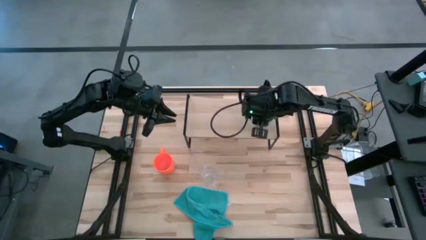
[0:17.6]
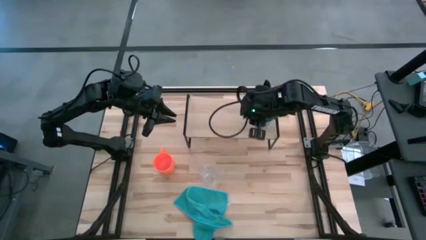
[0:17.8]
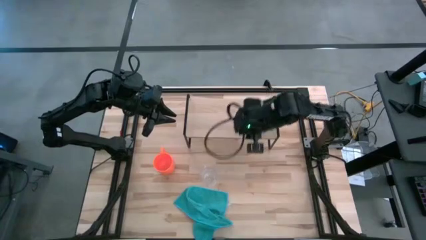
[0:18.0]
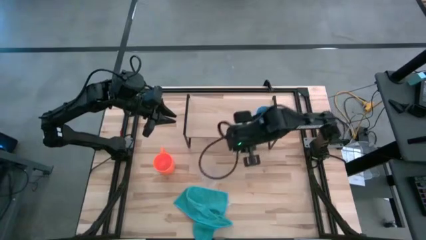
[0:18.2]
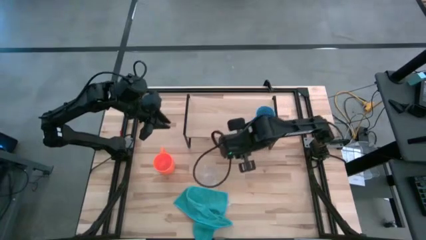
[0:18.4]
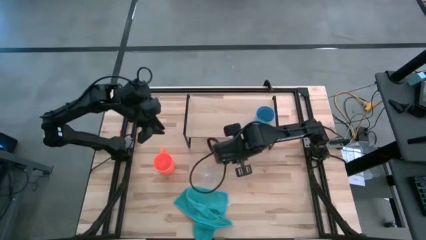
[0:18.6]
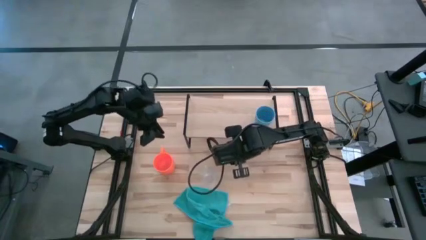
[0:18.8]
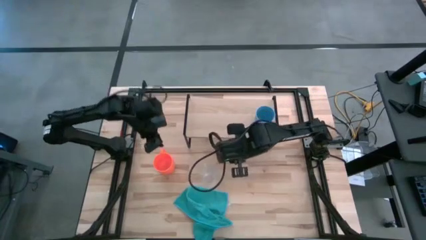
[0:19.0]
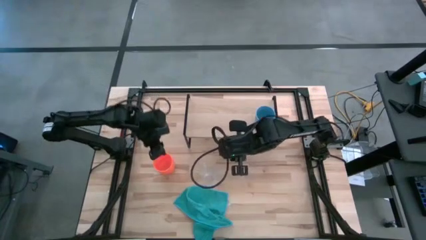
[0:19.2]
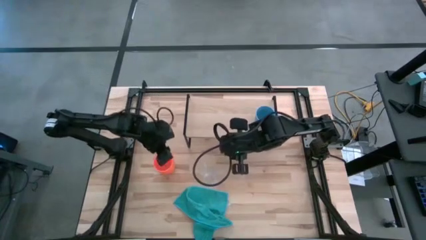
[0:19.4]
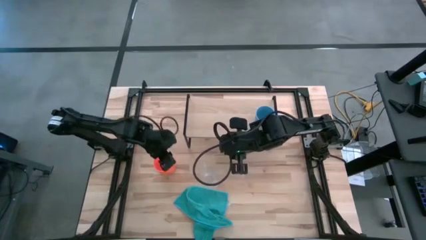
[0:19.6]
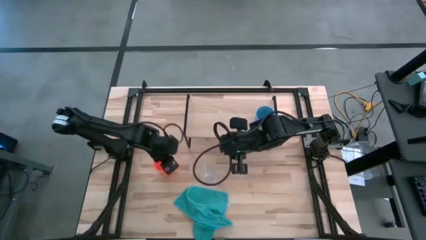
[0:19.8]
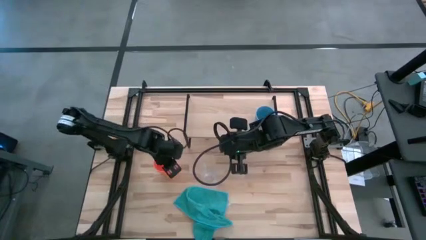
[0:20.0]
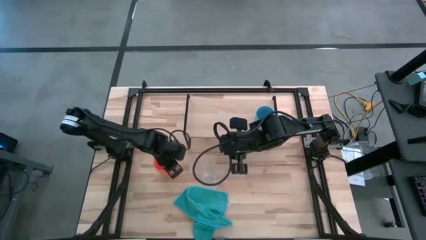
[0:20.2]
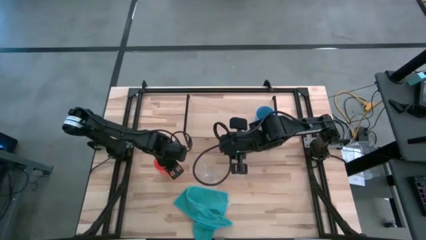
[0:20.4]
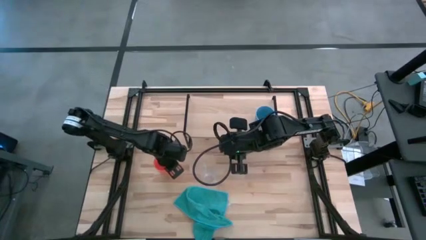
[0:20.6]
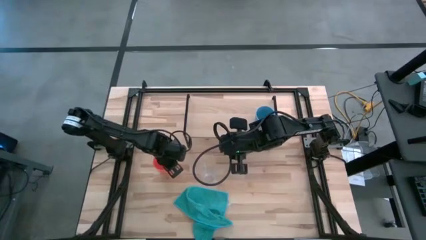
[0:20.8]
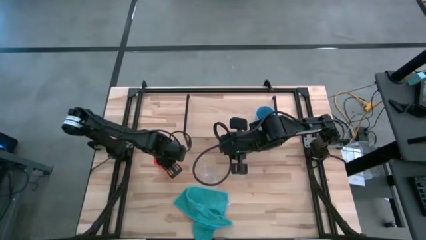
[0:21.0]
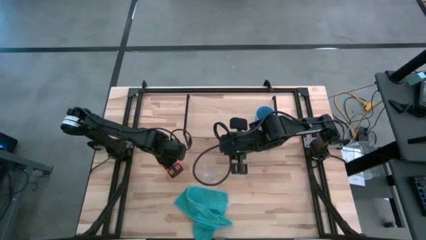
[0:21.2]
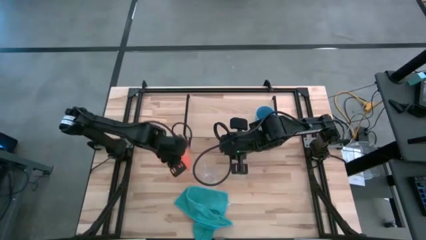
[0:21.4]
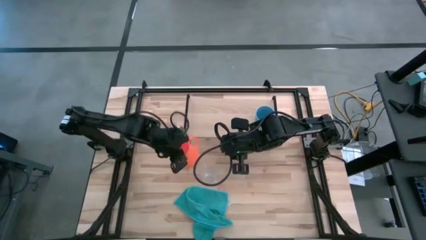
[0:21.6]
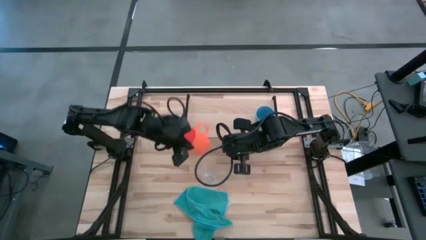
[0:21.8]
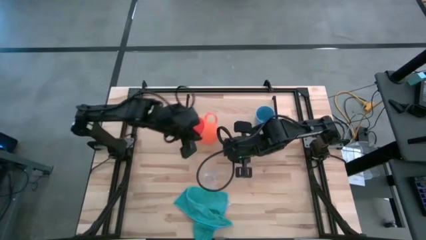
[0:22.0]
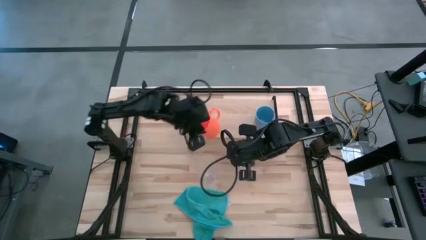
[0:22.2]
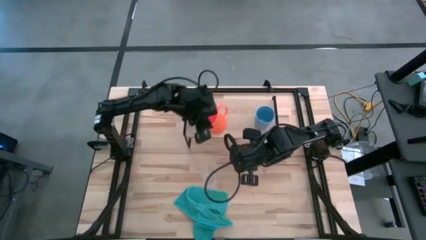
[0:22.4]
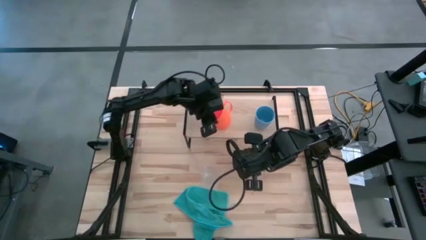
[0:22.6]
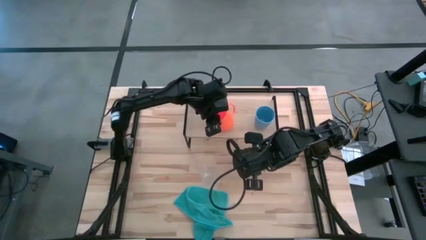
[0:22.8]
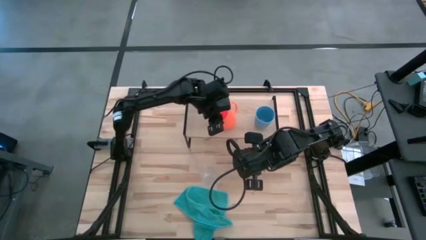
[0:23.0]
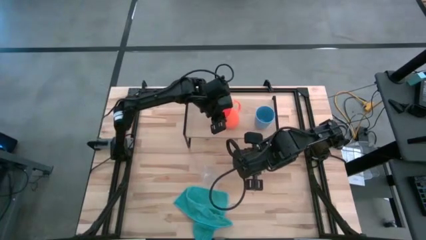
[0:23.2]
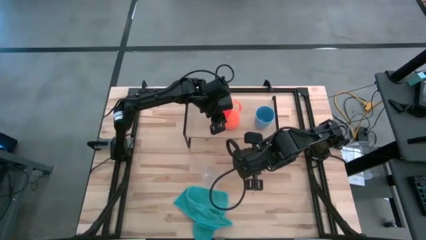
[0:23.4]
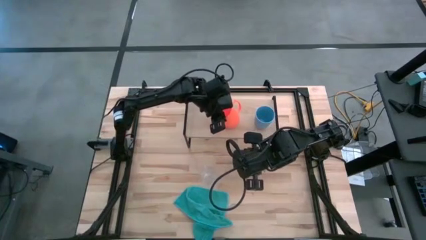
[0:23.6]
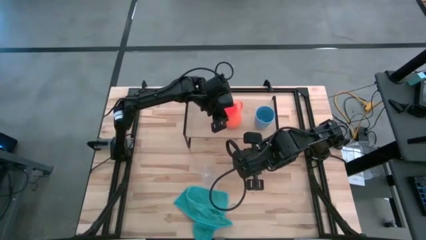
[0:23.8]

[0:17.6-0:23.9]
Task: Stack small to large cups/mugs on shelf
Put the orange mug on the shelf

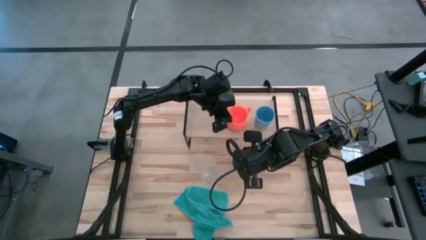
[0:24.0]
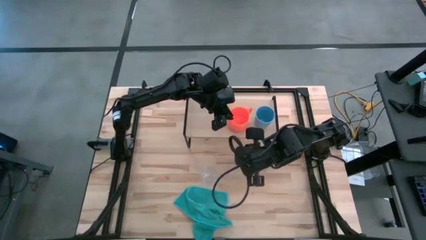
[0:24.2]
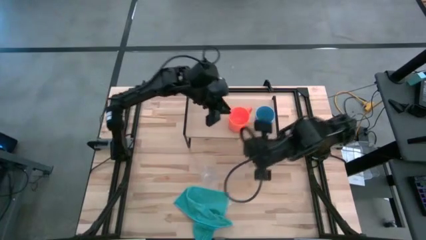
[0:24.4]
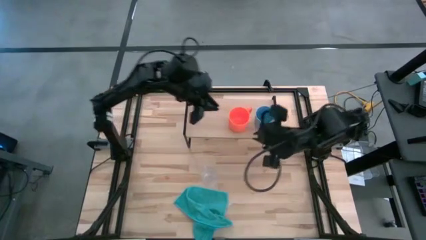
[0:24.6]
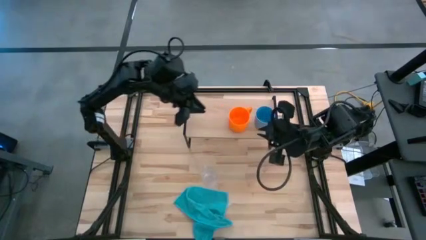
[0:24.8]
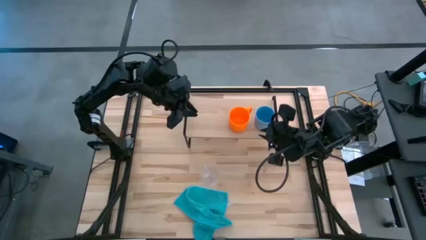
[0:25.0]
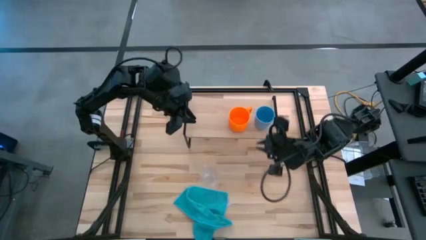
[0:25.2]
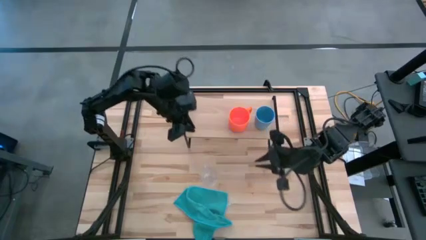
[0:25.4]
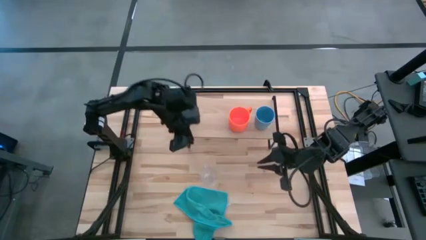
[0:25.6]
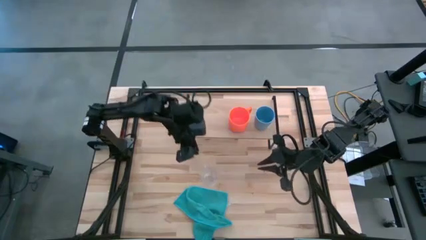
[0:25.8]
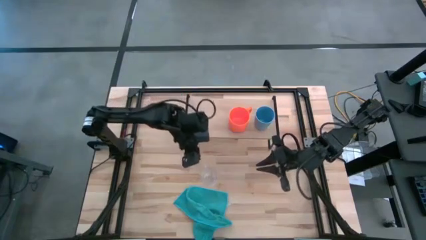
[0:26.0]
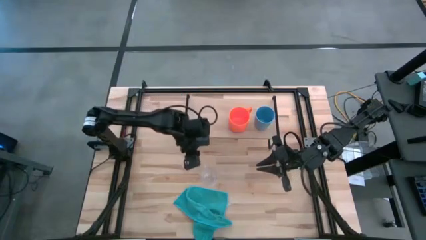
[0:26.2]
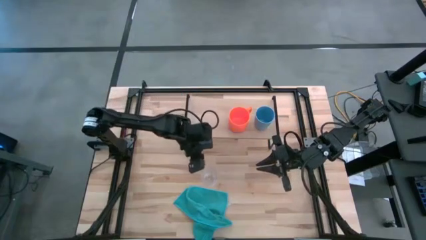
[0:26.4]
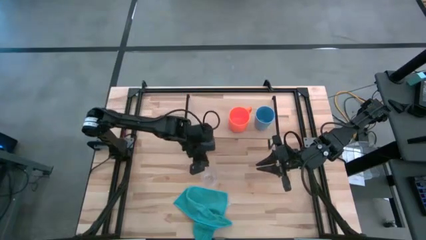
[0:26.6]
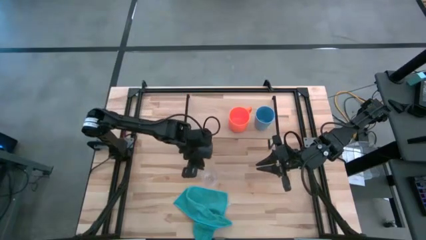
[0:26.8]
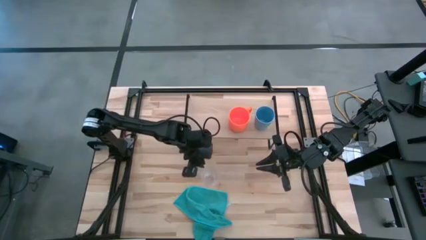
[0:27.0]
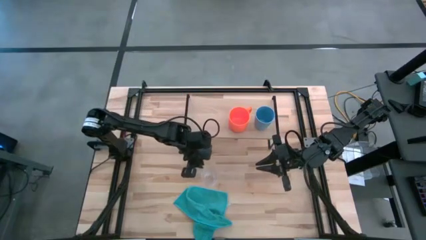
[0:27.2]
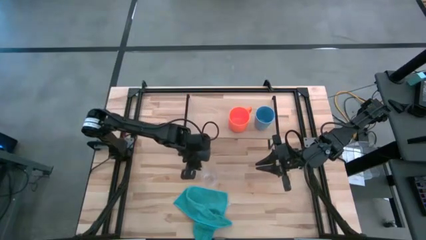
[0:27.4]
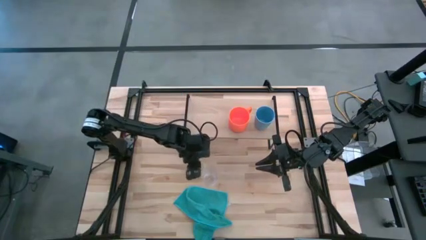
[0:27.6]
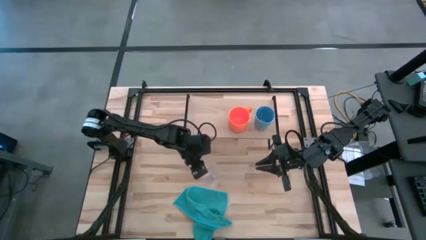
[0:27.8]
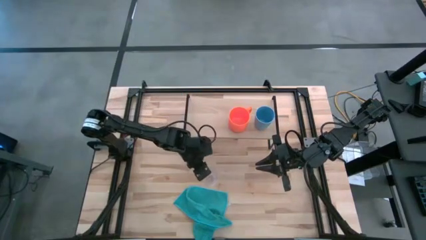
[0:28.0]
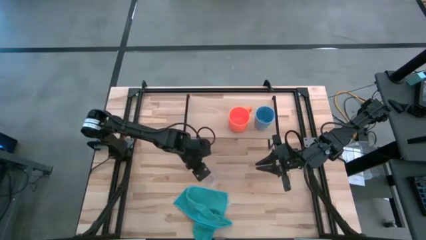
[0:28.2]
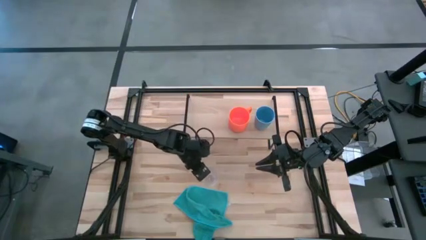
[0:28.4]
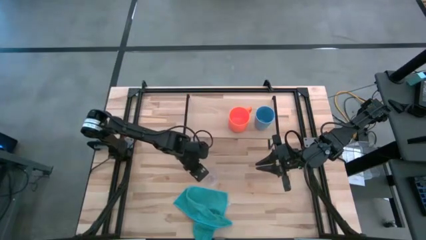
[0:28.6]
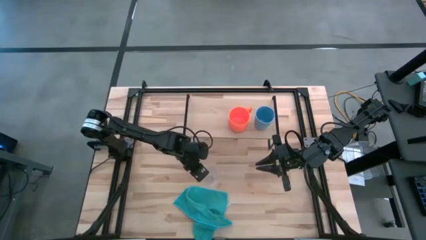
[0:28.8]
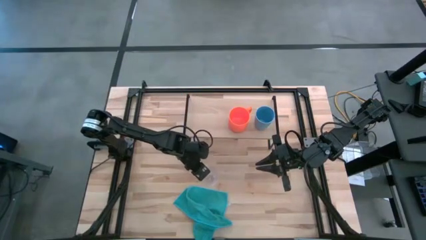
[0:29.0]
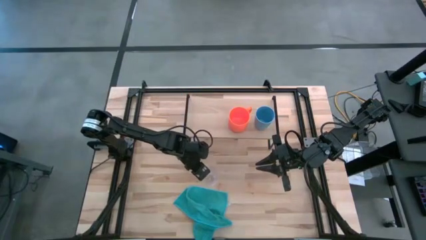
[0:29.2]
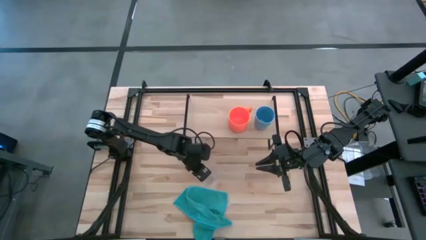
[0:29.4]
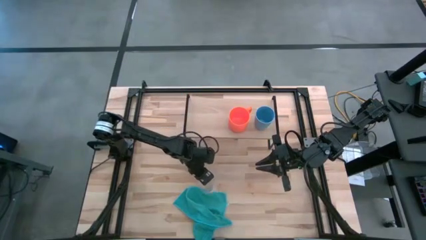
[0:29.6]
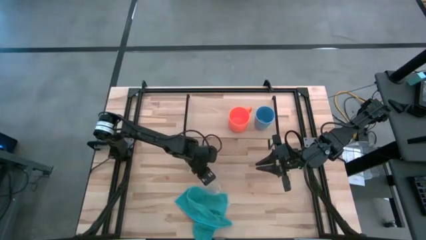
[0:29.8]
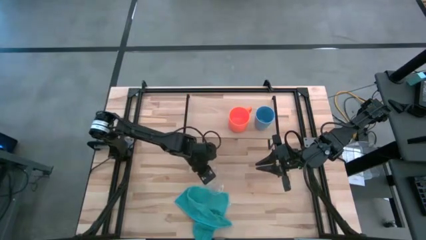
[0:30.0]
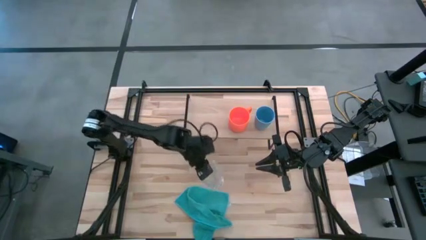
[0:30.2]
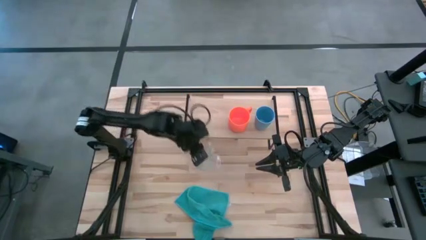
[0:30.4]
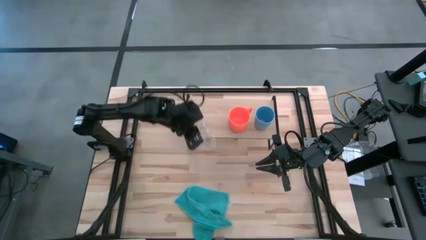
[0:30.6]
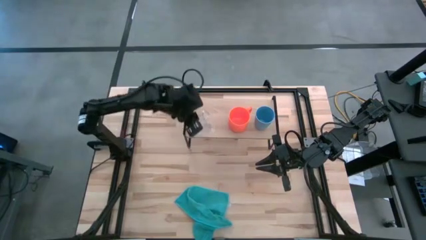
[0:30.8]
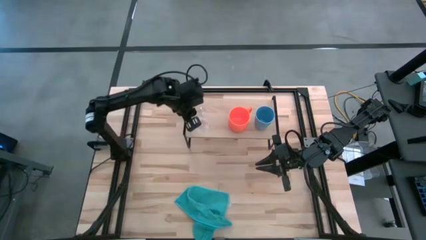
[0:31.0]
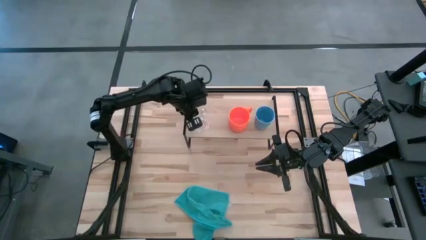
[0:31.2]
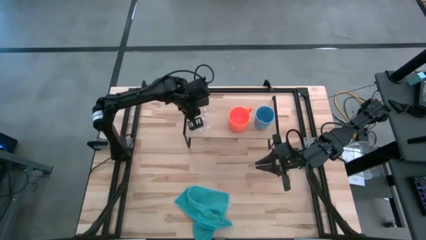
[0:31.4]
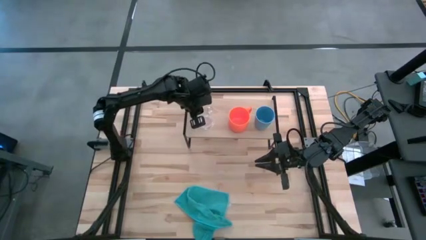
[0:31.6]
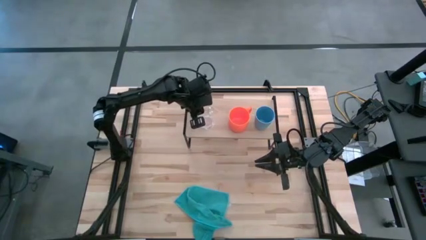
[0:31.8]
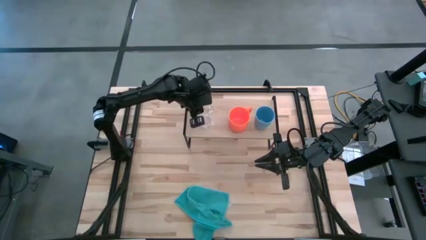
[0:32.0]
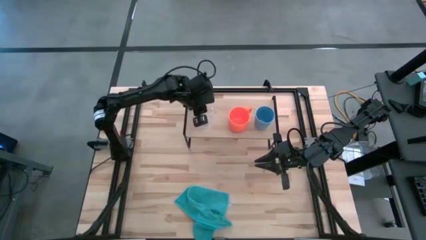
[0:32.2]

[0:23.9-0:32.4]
Put the transparent mug on the shelf
